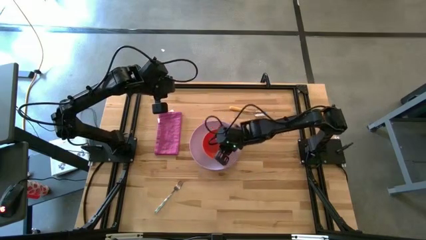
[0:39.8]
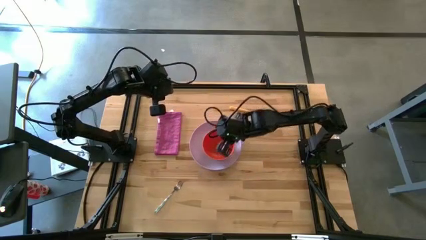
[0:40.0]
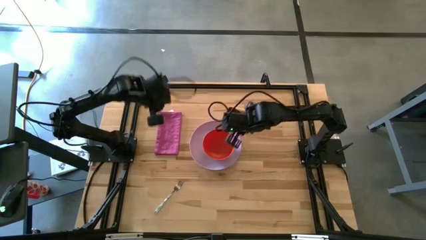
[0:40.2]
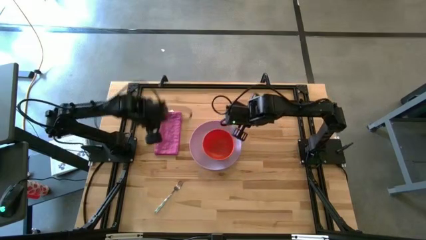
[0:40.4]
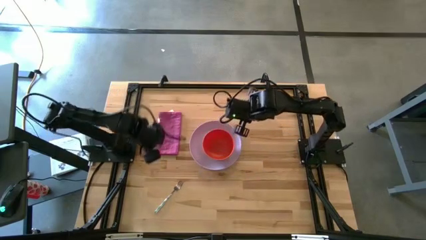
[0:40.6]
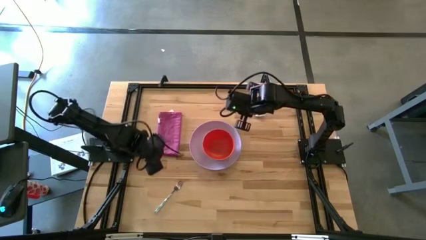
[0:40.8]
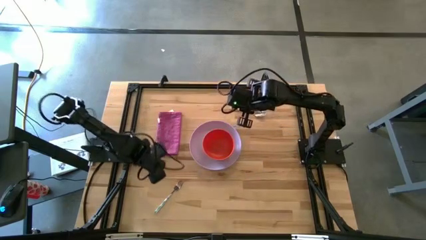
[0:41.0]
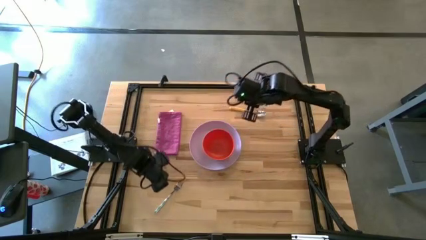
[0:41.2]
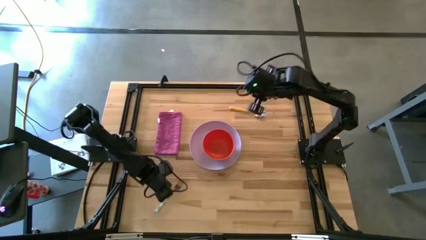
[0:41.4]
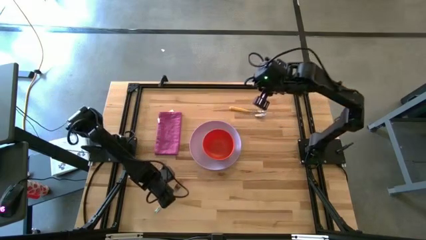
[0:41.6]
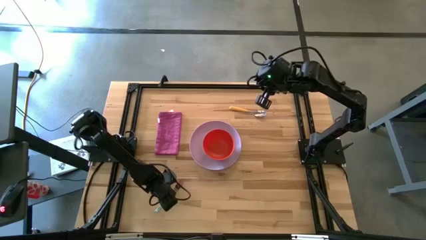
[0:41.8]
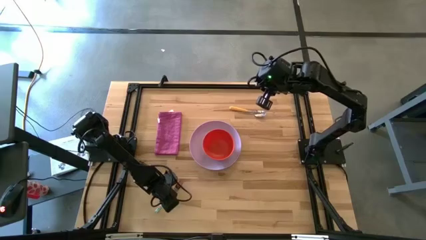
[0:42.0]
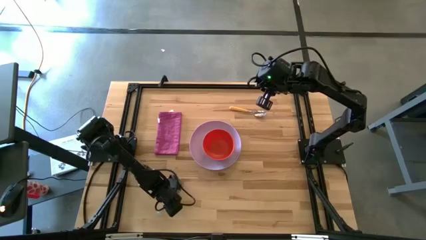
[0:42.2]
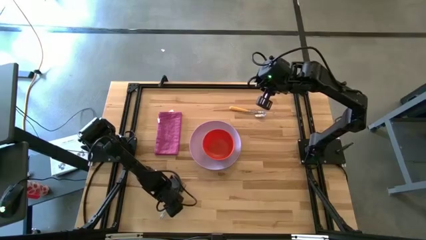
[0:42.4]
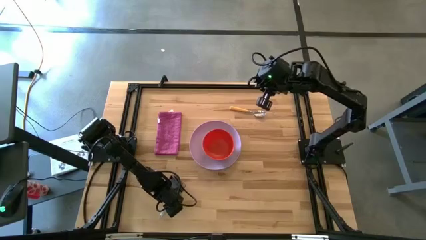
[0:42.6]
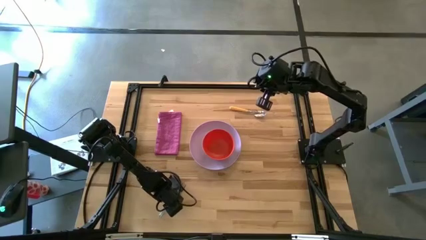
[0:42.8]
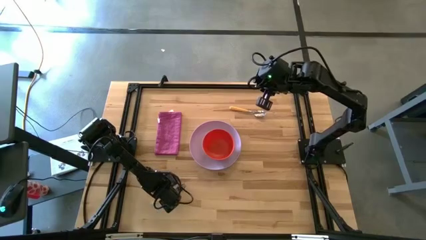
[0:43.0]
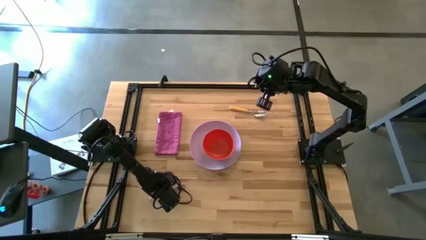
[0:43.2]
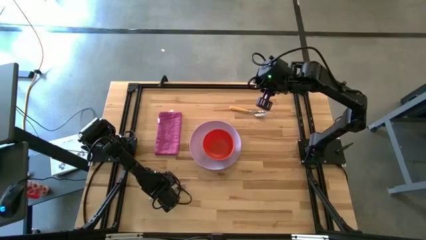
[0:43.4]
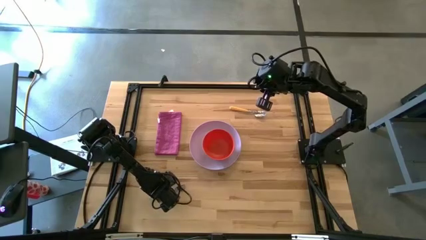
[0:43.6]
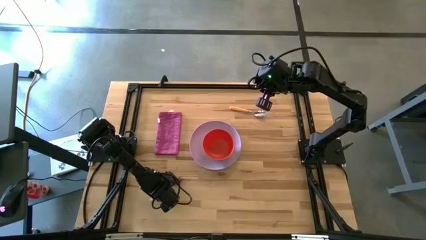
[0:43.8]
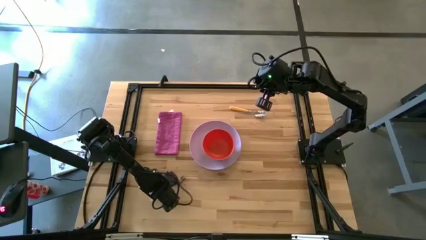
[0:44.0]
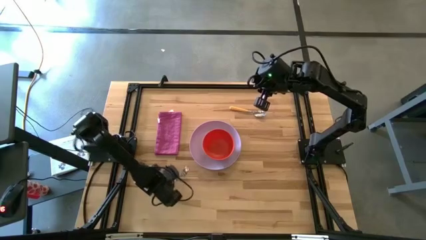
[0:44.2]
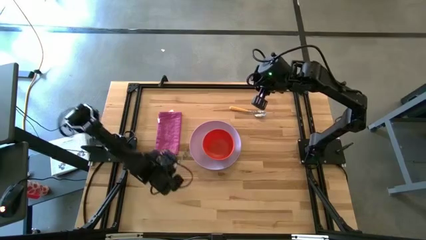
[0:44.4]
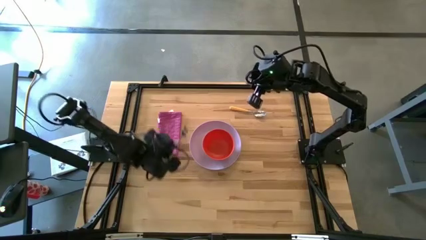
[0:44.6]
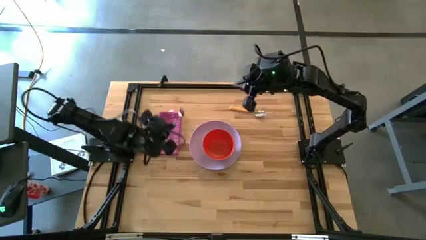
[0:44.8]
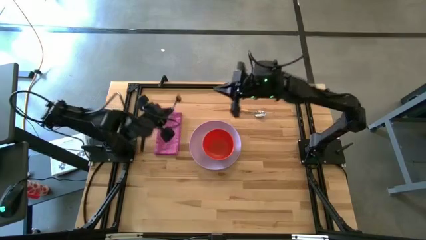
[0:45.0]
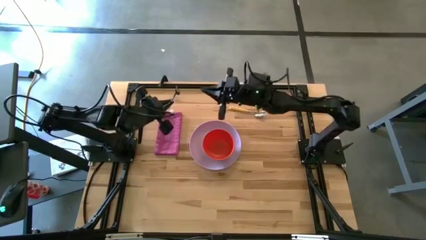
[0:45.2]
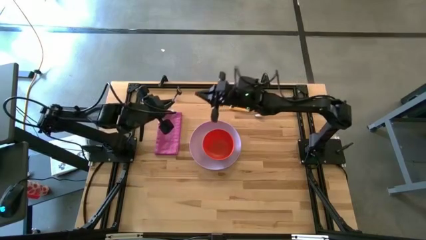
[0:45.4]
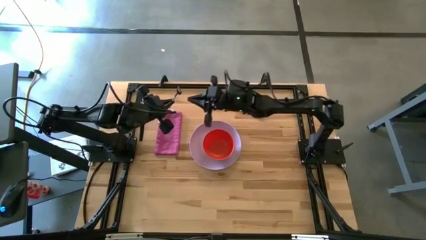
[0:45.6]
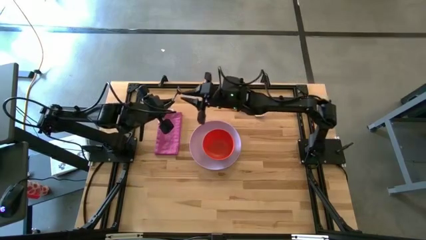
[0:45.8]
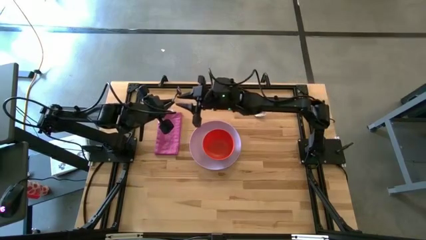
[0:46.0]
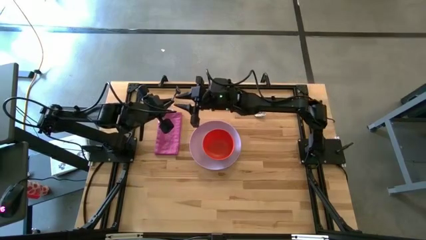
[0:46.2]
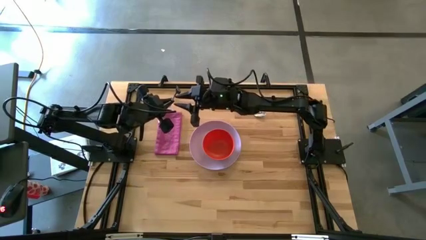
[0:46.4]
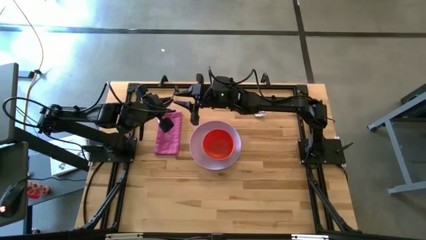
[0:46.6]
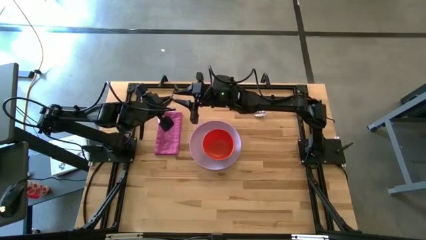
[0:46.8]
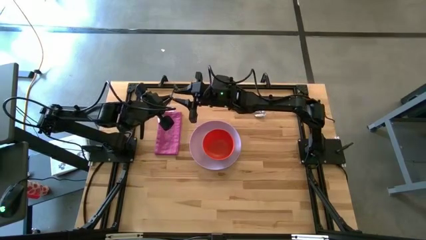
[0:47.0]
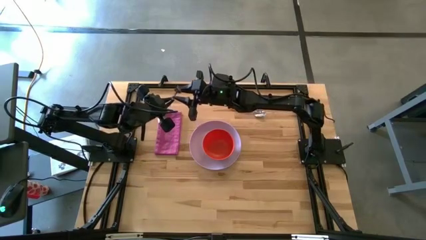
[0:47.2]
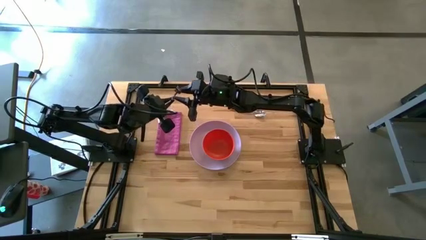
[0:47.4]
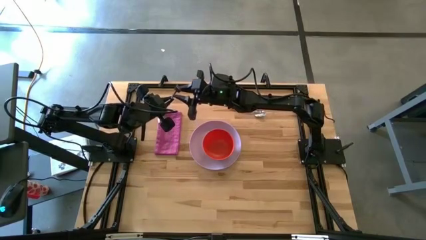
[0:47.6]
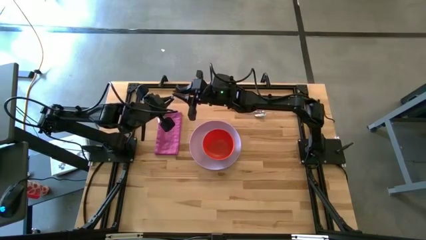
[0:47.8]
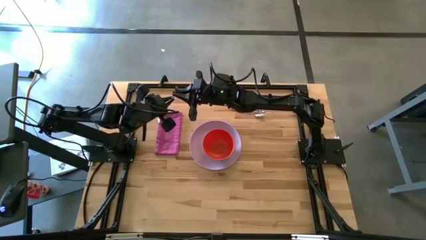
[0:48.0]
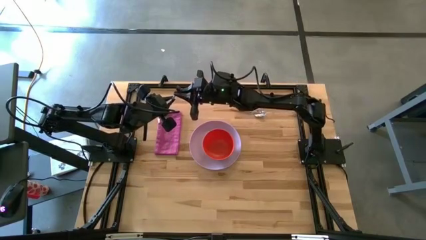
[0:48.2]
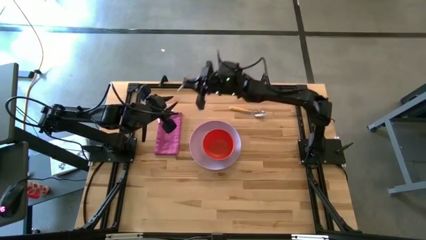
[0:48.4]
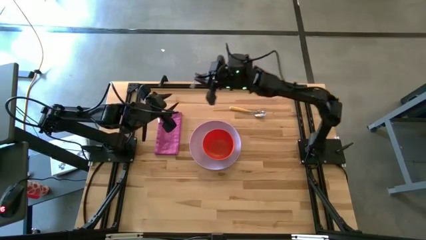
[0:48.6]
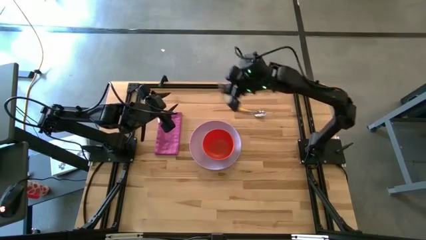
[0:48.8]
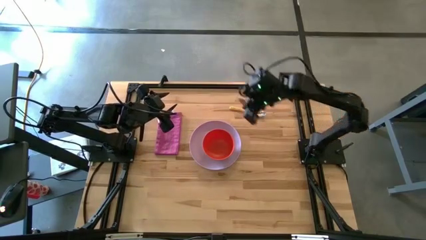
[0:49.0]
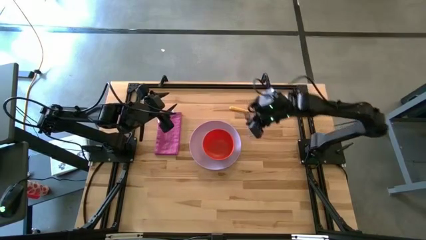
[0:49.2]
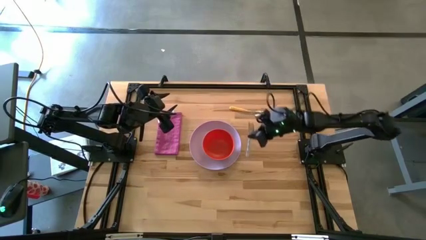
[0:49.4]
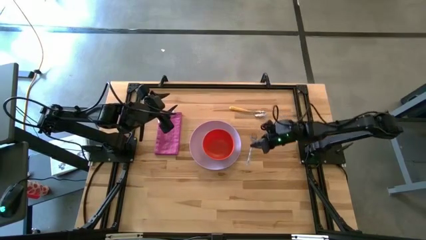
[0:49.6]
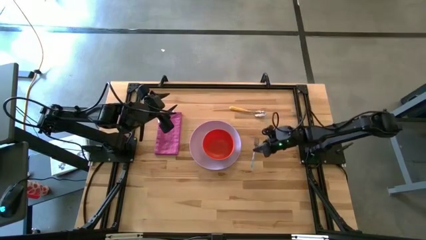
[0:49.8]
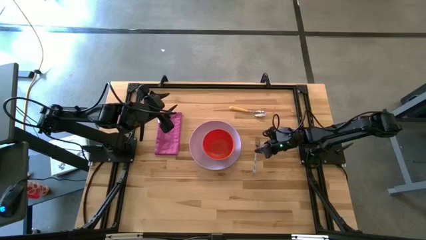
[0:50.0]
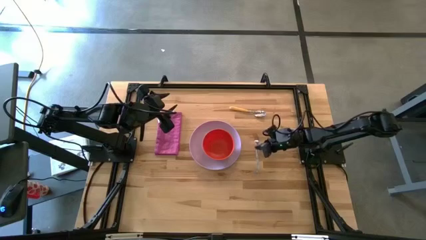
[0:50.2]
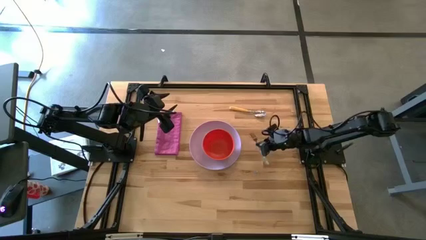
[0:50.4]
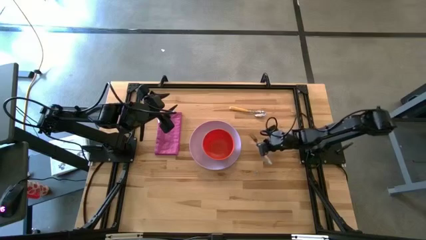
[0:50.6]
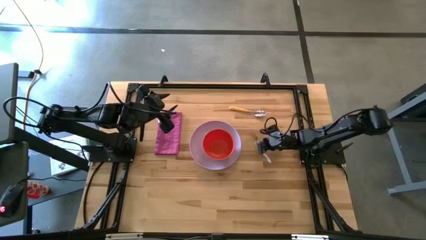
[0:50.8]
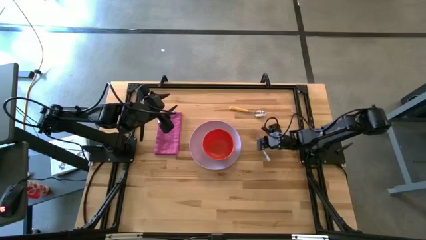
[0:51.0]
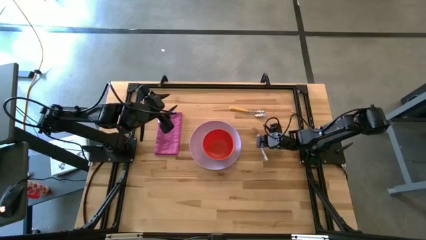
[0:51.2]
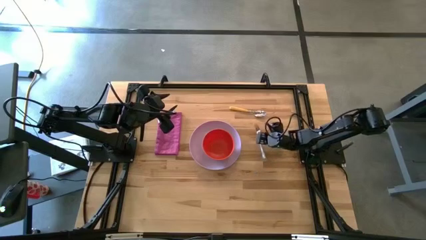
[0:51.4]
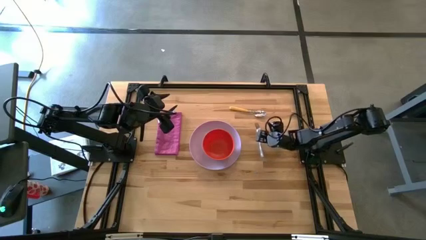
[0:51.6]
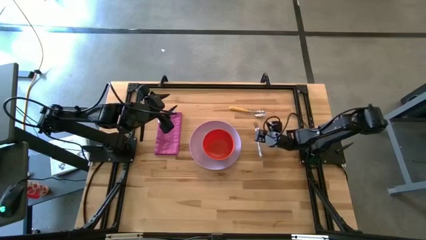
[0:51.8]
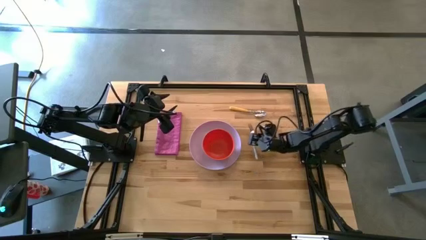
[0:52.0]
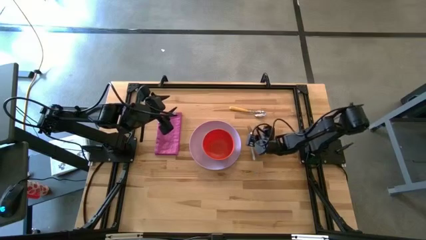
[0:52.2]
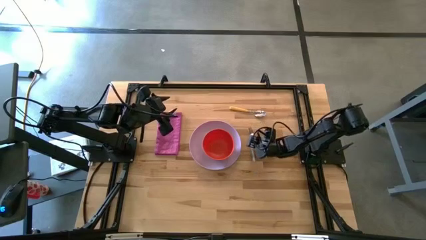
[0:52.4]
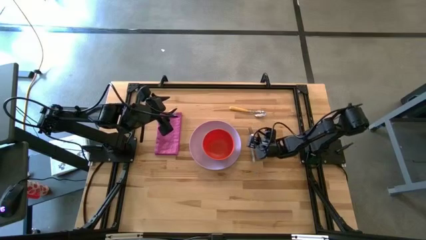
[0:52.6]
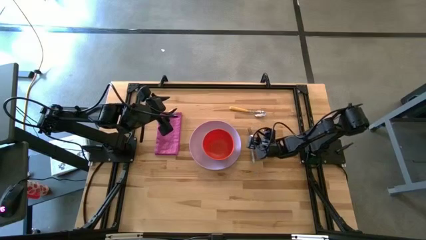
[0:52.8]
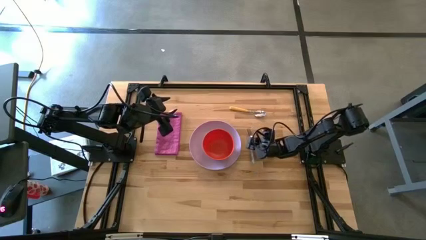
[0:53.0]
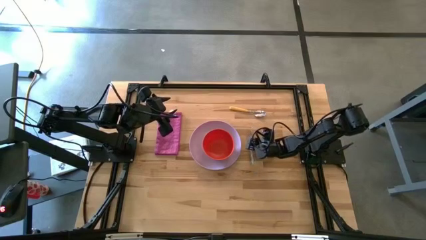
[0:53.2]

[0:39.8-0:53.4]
Task: Set table place
Put the blue fork on the table

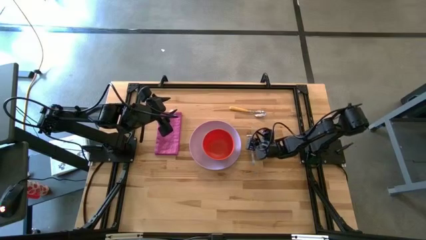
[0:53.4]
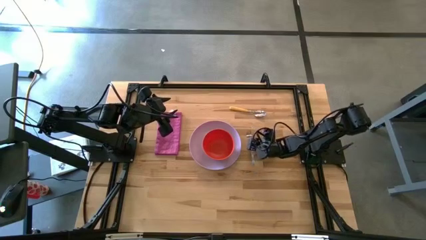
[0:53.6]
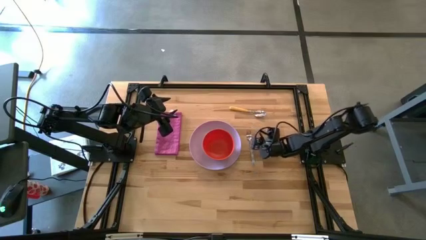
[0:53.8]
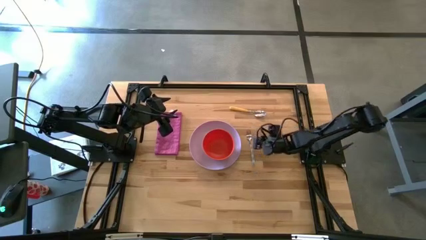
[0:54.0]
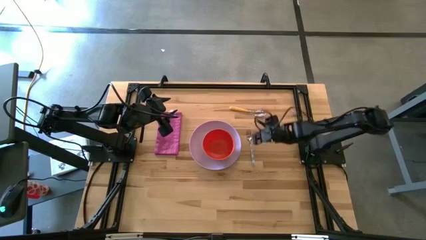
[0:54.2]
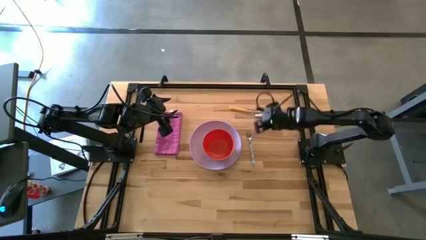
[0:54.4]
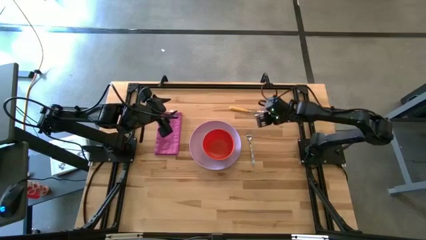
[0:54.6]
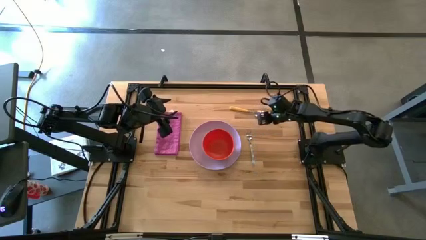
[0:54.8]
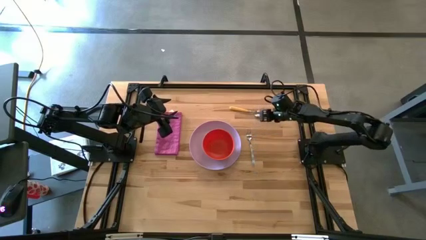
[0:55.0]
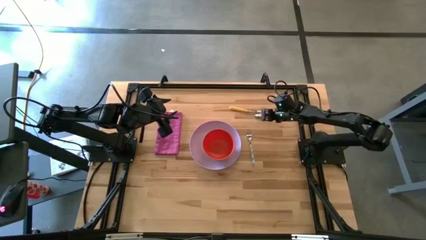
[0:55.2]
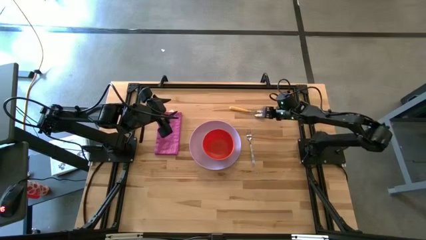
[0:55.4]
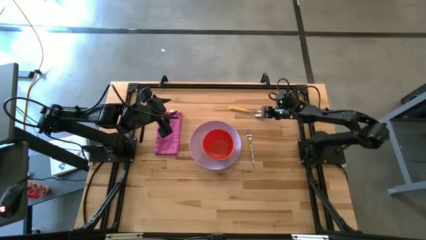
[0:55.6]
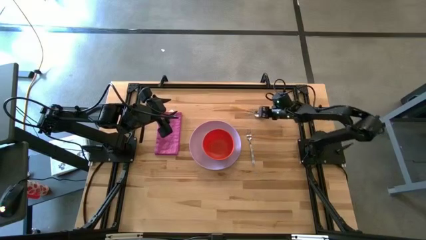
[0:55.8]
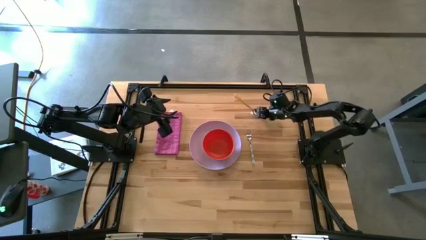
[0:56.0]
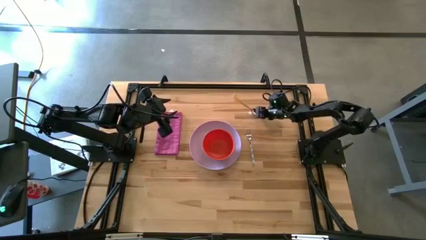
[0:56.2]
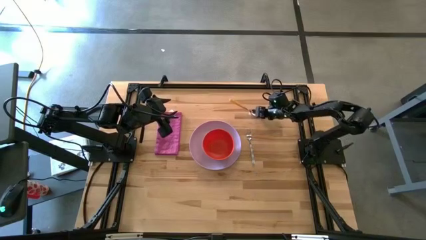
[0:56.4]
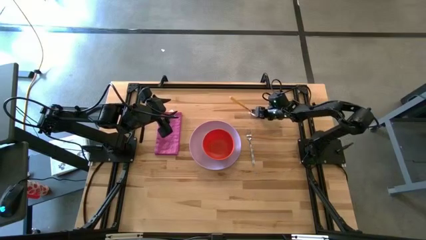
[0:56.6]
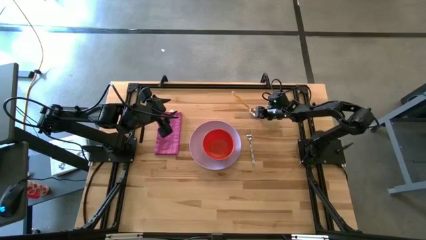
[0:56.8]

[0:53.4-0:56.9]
Put the yellow spoon into the orange bowl
